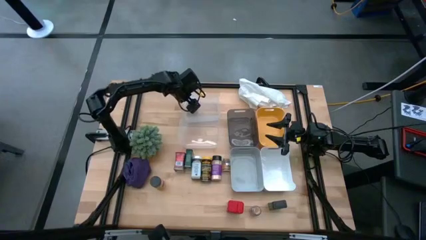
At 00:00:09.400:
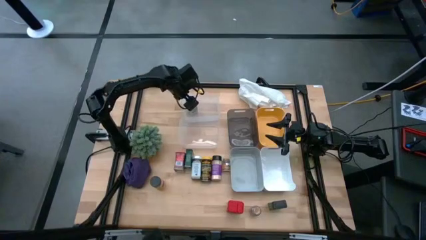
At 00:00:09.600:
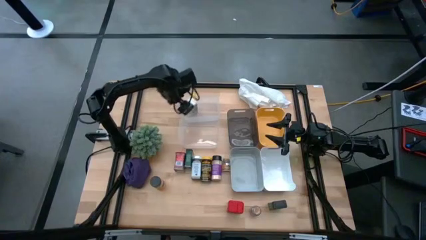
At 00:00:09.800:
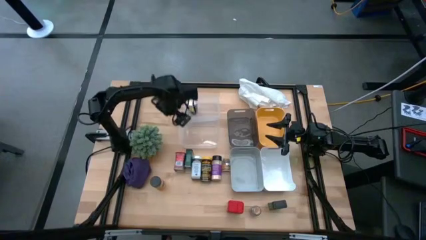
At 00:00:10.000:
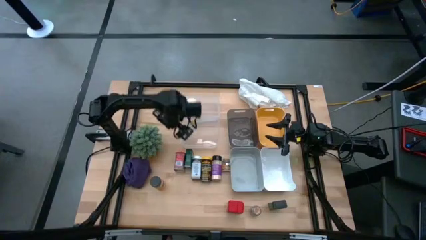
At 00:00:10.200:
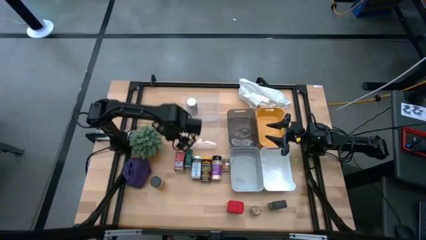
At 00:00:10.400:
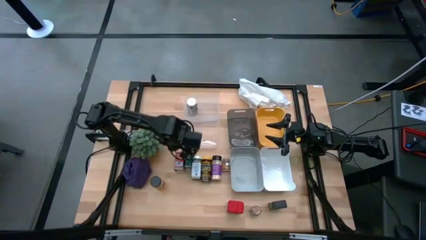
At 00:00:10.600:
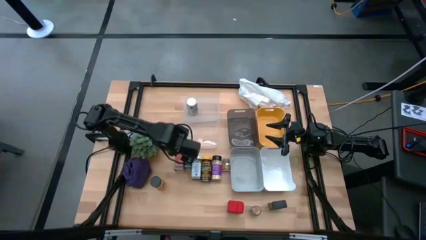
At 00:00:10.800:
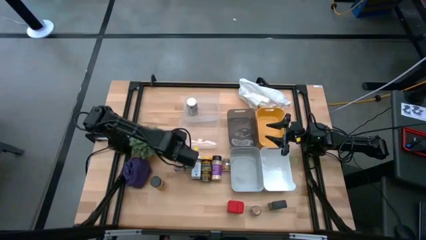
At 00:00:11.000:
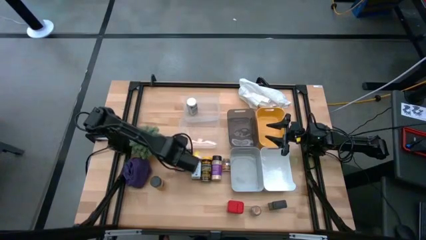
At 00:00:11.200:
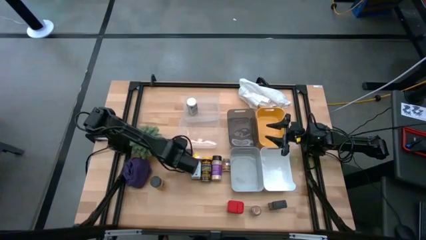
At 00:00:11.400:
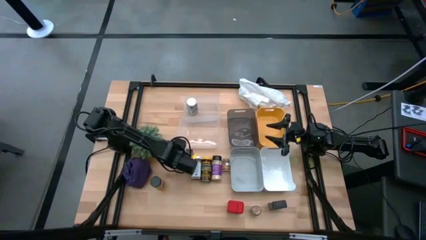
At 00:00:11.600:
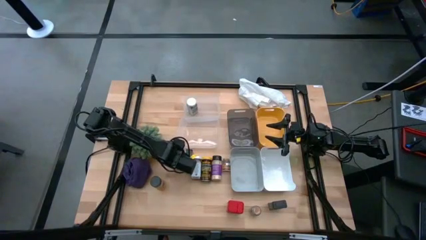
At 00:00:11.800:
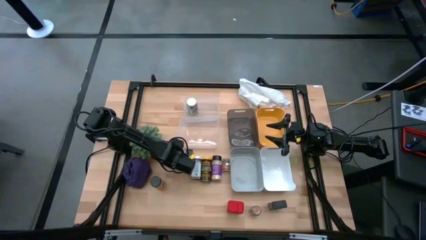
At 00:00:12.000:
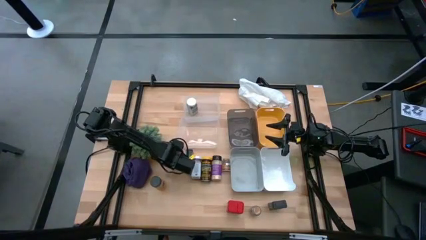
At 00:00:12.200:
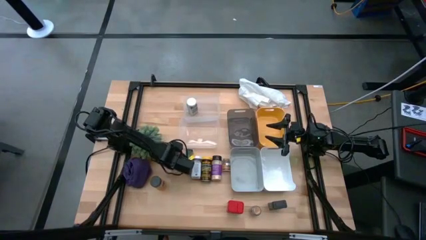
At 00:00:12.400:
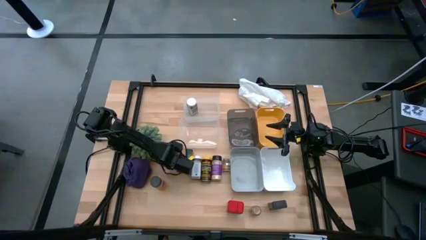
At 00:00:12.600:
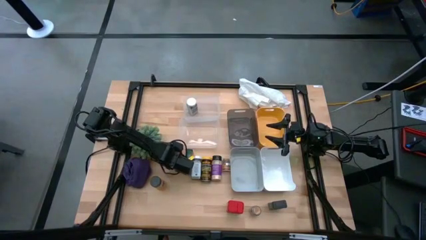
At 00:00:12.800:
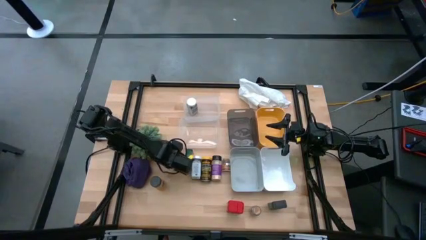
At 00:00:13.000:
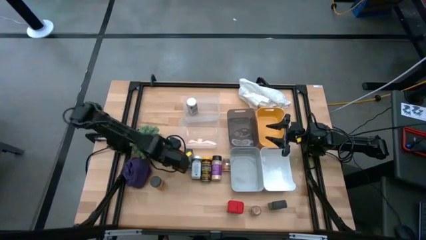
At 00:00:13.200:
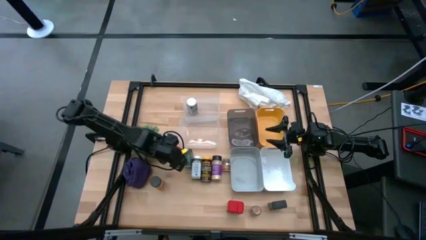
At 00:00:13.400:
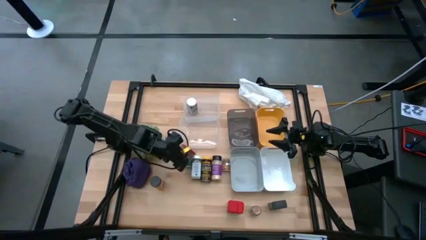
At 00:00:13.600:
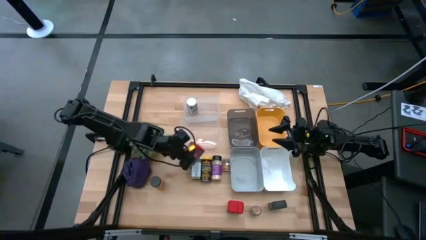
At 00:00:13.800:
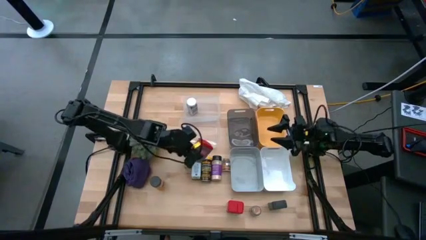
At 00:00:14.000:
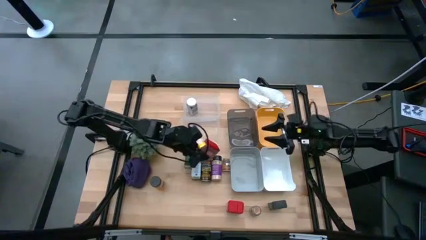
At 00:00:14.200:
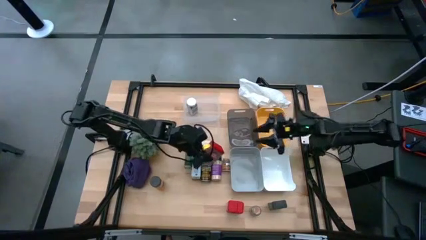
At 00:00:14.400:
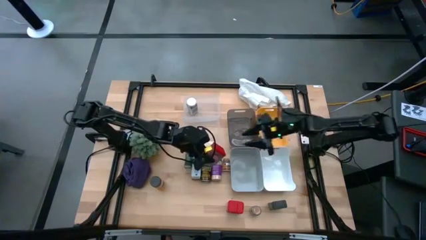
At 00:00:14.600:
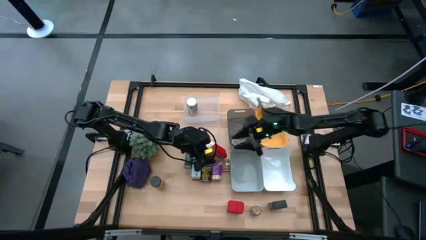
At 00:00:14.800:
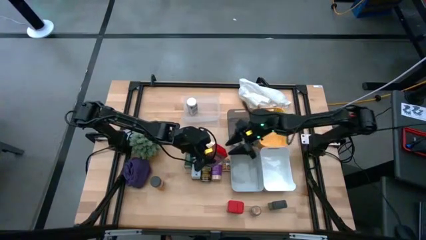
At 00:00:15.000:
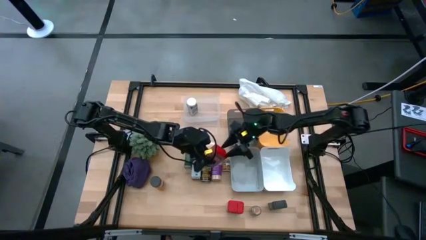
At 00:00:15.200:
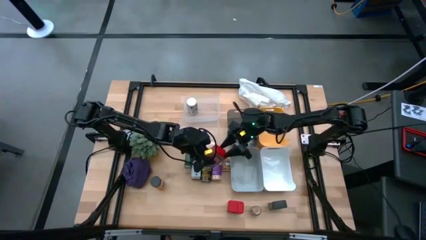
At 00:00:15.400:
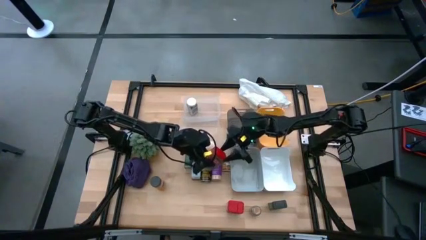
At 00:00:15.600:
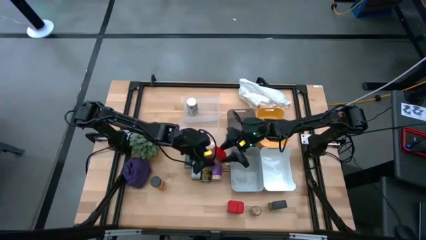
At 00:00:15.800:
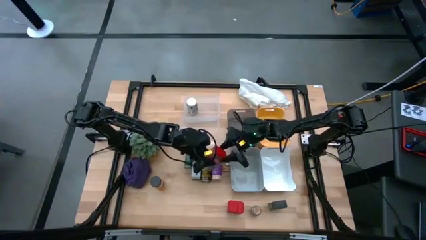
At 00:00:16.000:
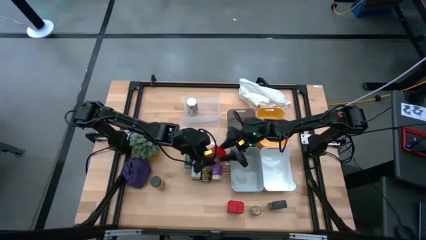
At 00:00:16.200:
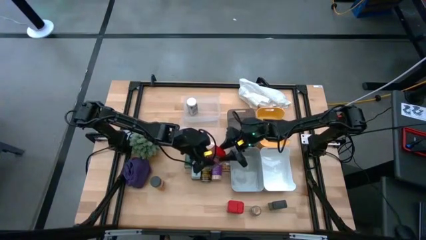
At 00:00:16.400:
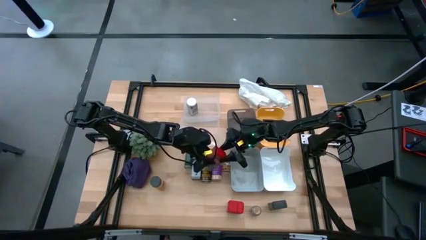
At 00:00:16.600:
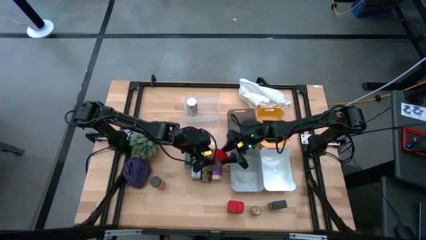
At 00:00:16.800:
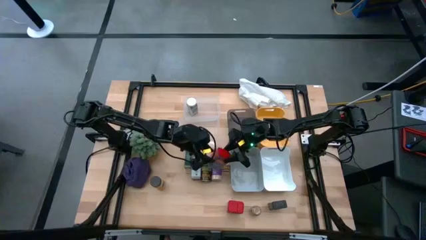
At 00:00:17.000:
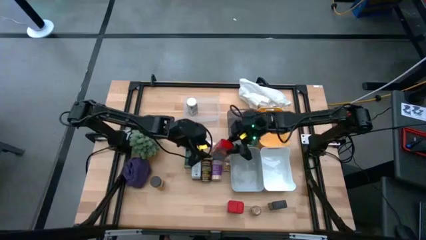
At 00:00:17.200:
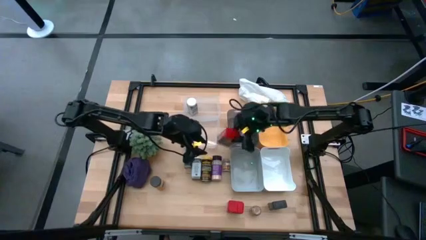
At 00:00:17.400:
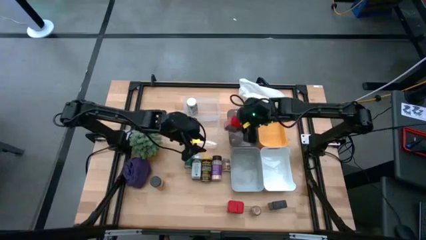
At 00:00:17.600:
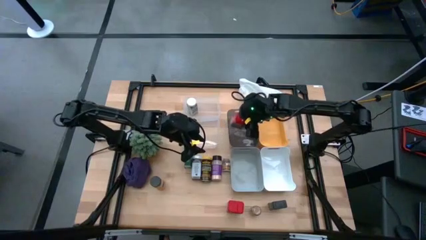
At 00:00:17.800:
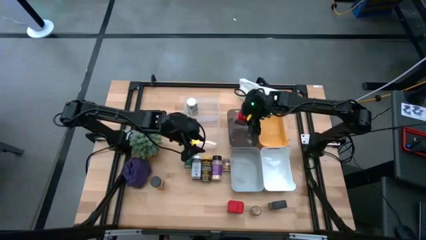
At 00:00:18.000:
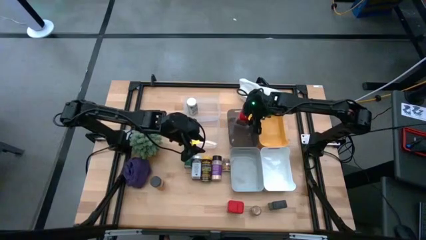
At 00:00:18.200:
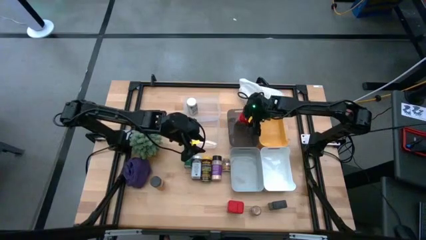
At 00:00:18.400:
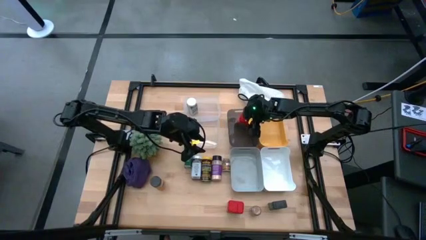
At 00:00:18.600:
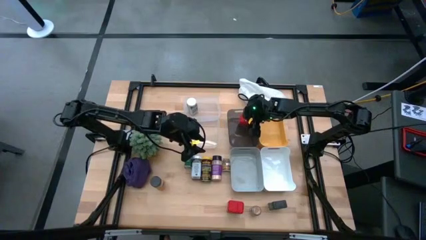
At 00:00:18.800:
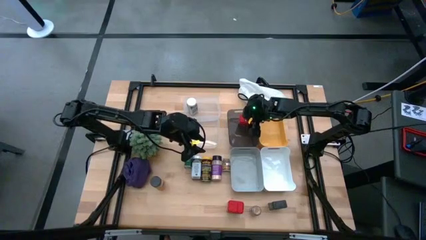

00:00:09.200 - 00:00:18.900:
Task: Sort spices by type
Put the top red seasoning can into the black transparent bin

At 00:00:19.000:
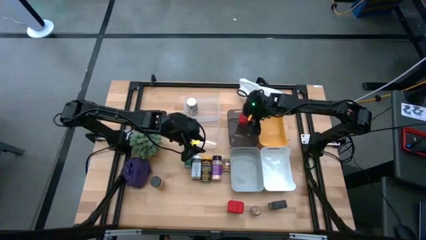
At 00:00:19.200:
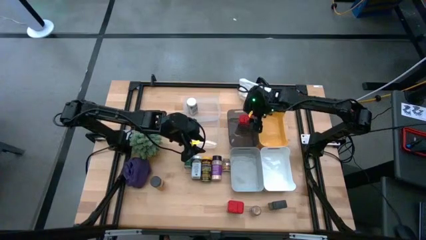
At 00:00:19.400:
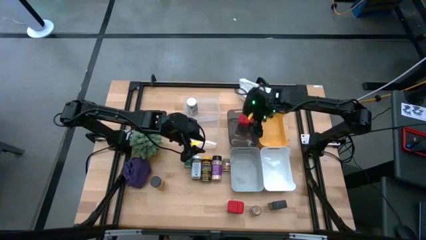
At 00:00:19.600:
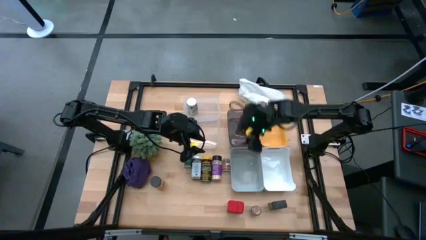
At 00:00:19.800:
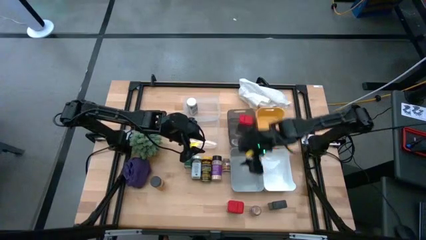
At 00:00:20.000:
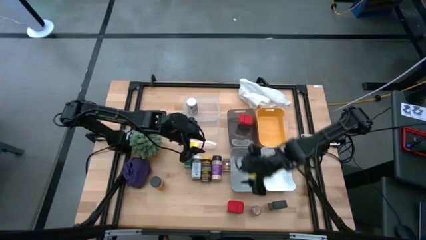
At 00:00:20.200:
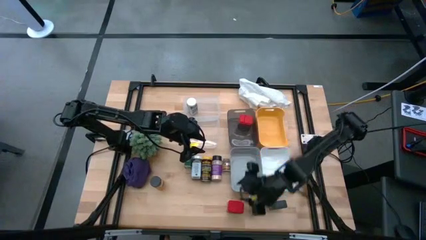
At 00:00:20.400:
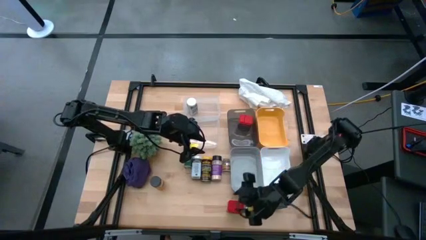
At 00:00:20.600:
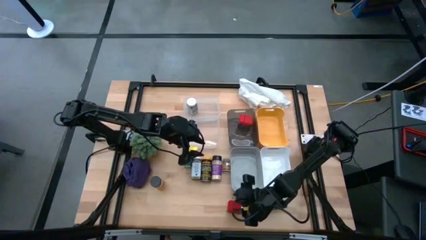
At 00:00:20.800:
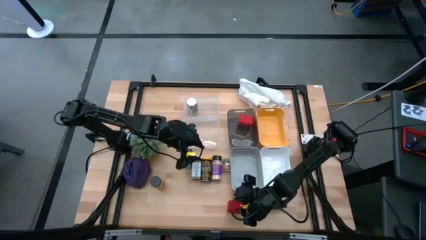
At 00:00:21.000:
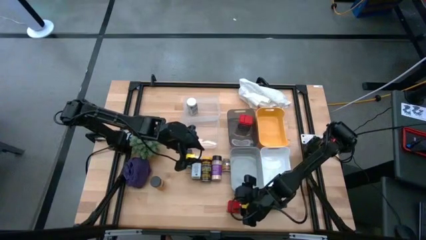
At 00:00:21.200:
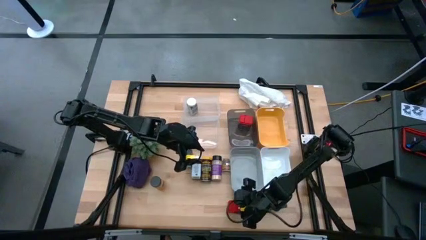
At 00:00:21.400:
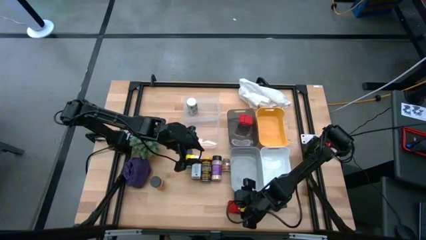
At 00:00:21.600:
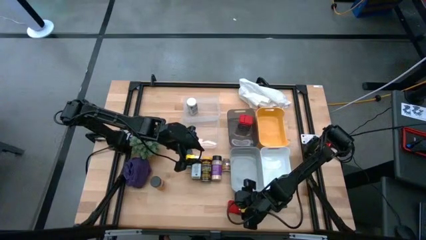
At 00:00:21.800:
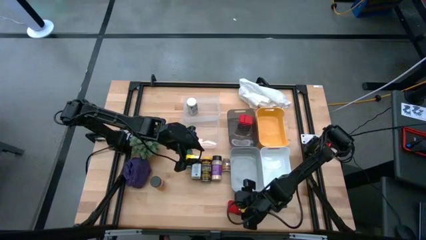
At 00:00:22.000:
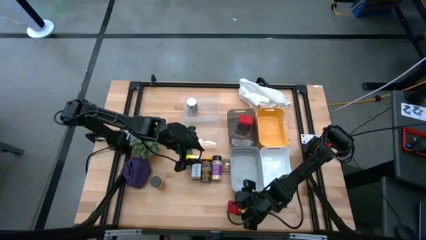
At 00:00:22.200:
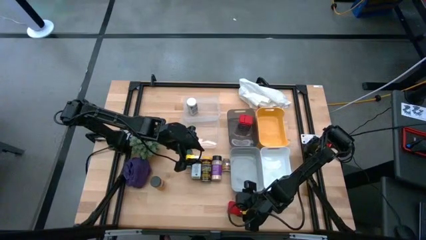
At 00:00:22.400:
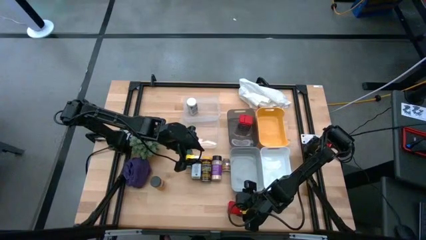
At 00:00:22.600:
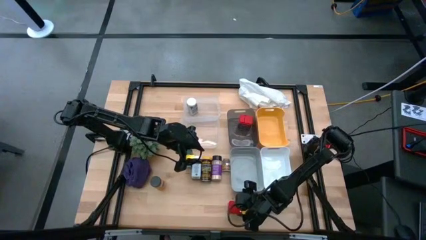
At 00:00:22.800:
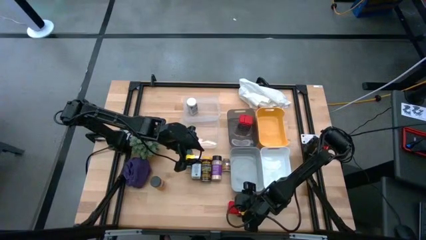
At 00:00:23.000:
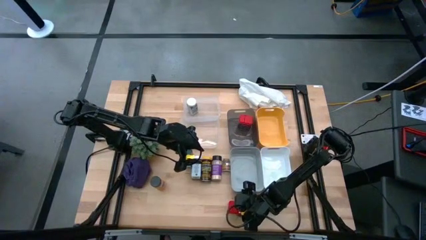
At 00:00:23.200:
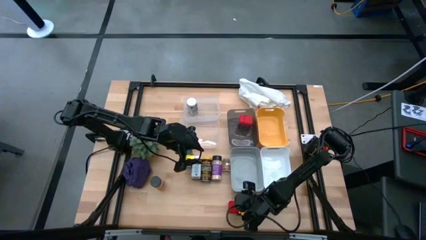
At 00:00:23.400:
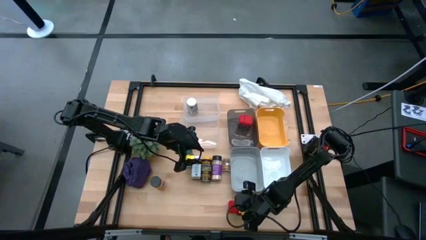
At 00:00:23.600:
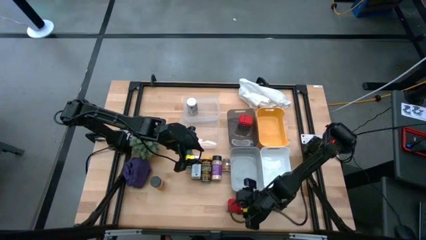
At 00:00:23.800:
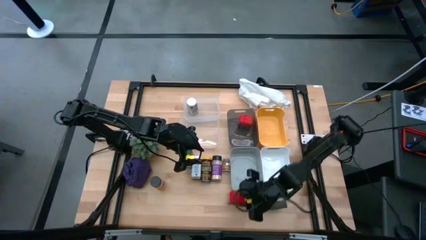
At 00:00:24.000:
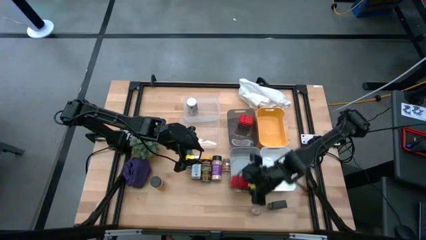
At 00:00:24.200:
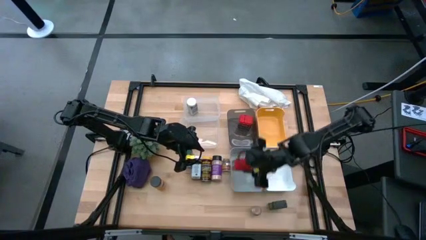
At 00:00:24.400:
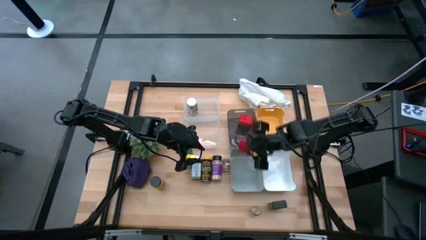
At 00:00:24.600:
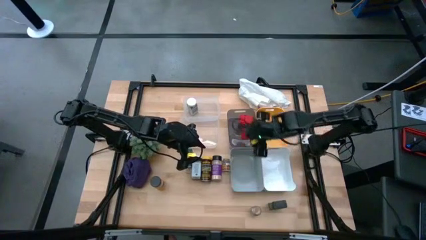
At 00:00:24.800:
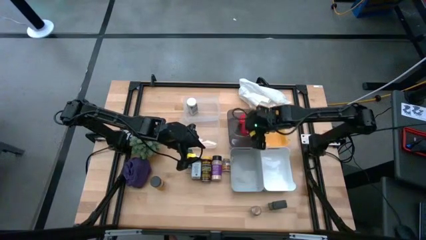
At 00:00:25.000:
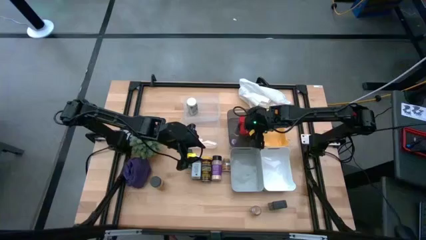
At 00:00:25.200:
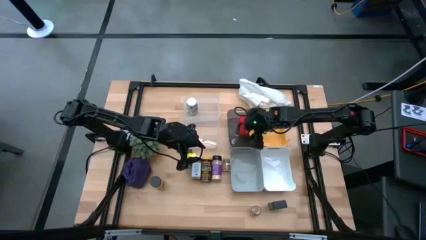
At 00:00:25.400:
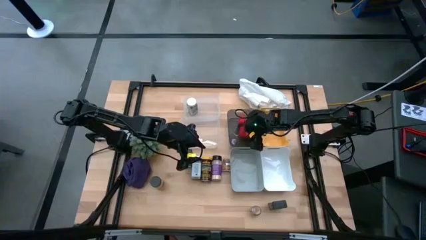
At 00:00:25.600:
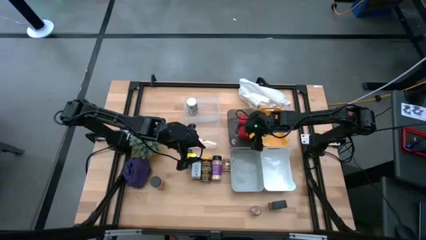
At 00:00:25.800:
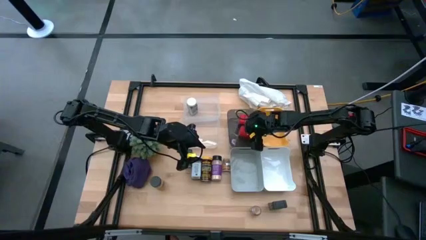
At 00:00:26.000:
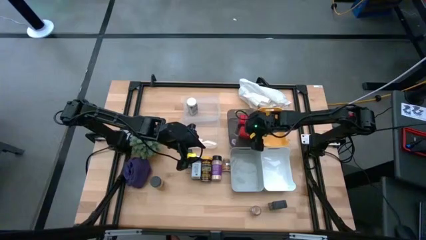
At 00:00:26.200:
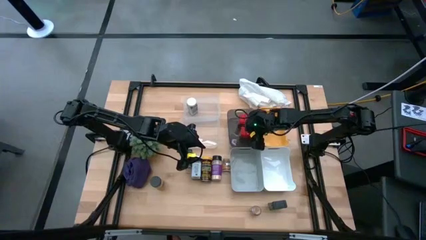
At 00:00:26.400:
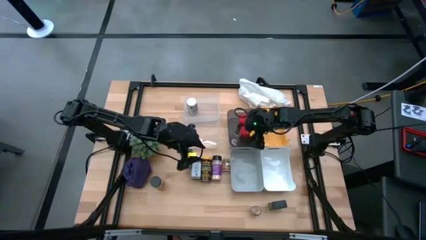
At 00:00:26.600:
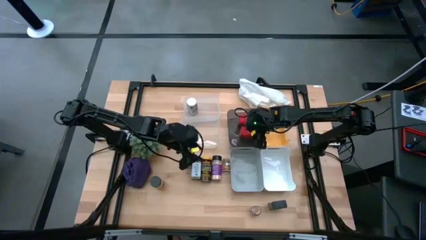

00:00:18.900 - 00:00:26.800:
Put the red seasoning can into the black transparent bin
